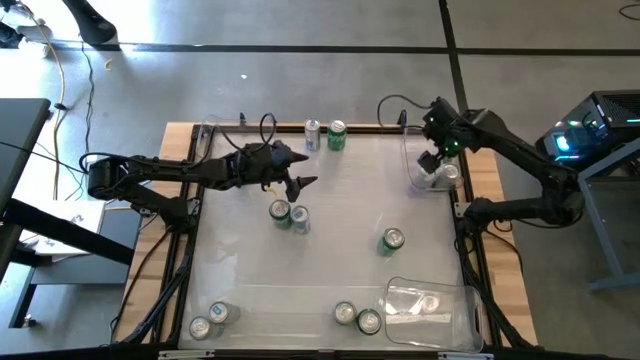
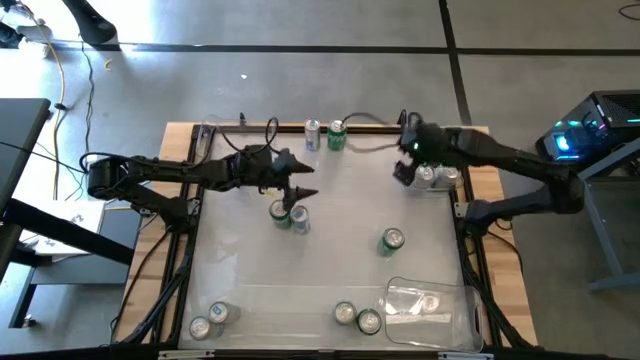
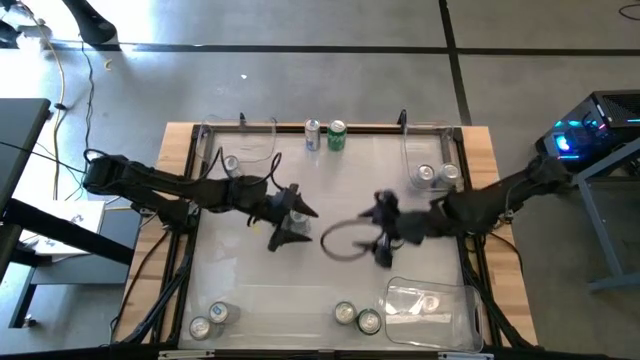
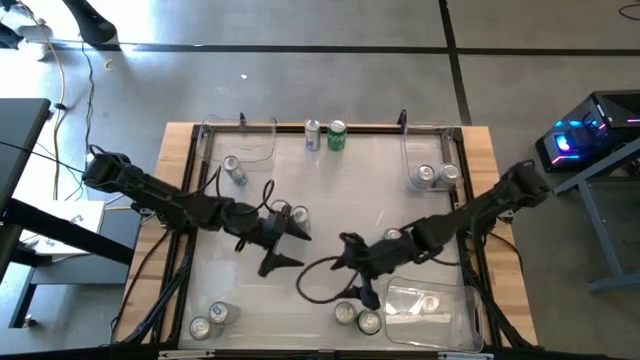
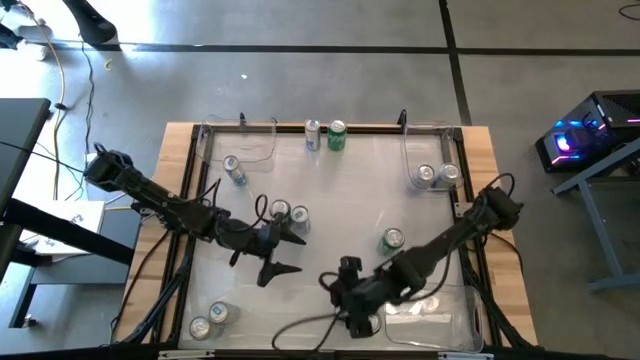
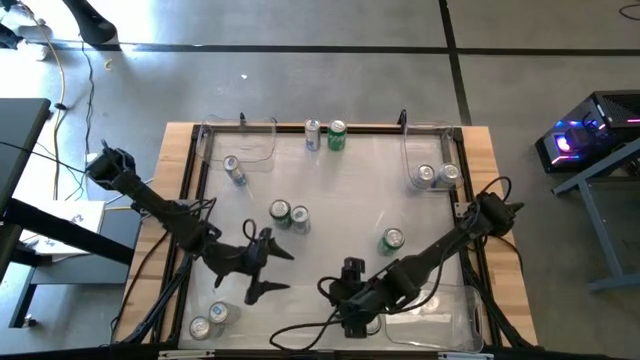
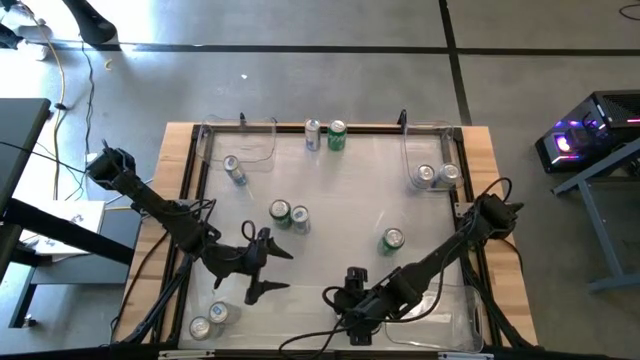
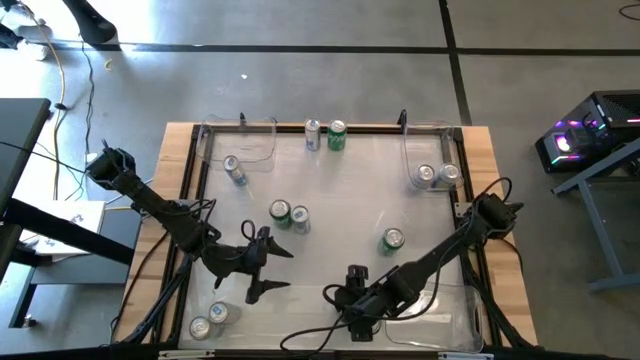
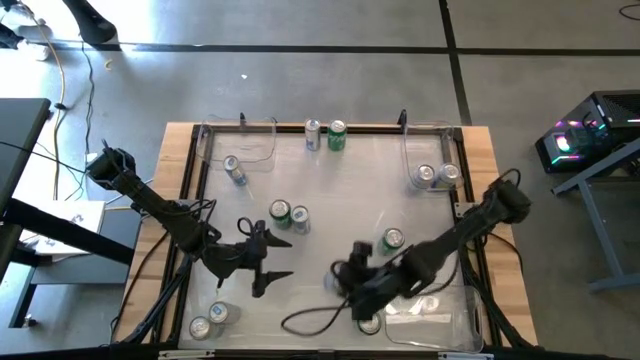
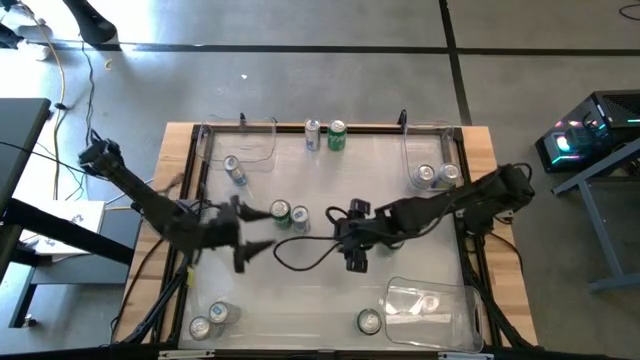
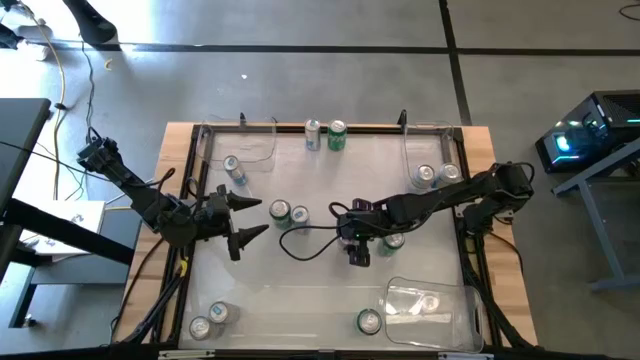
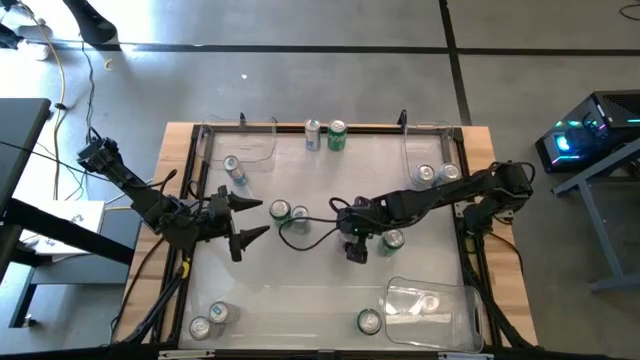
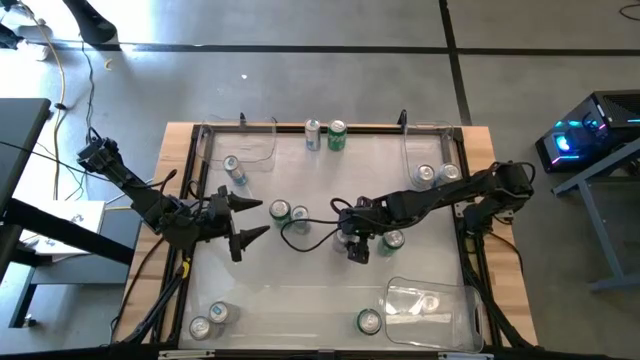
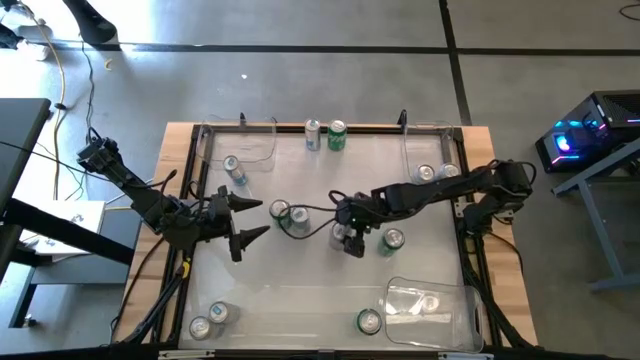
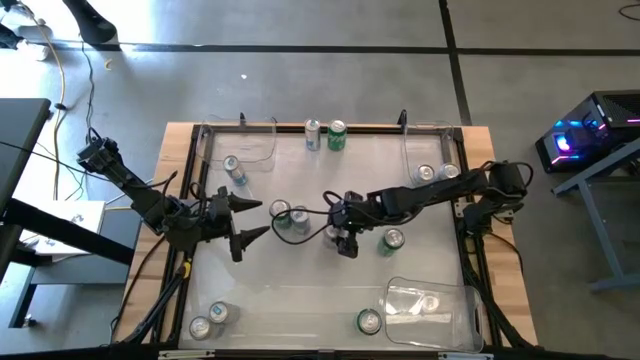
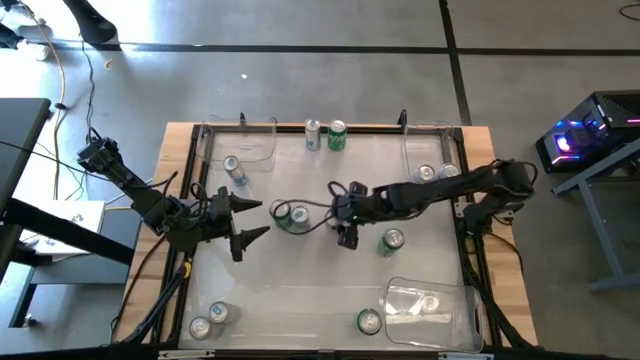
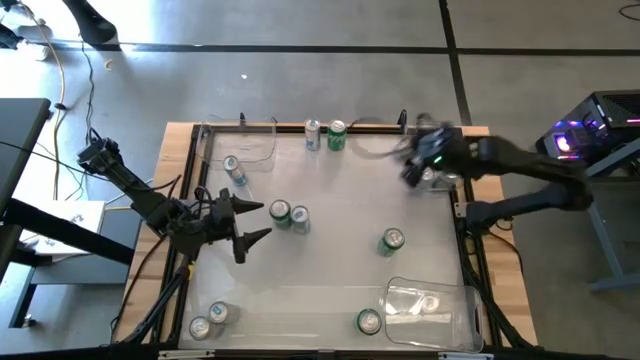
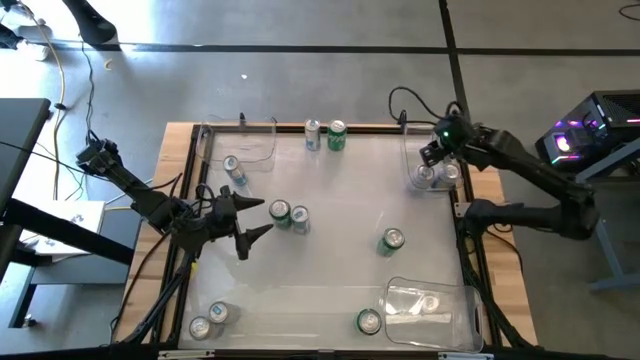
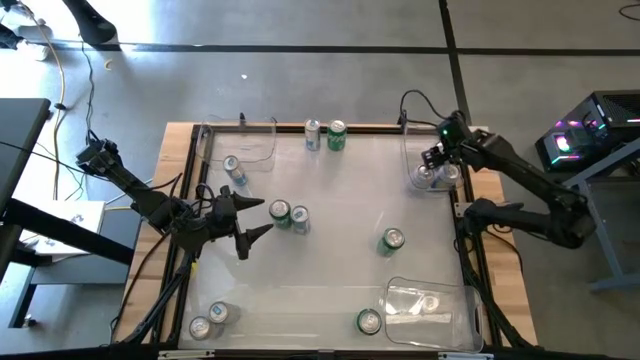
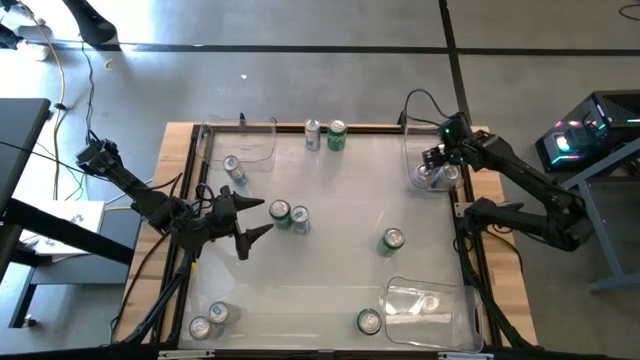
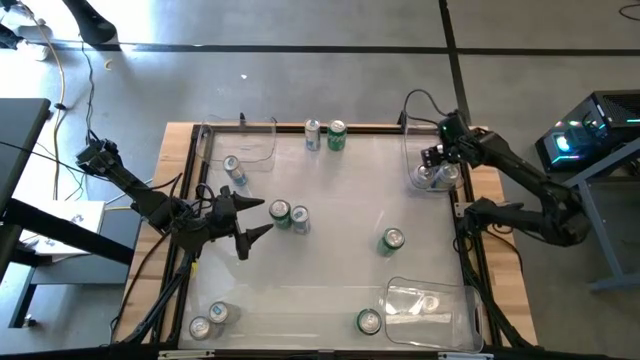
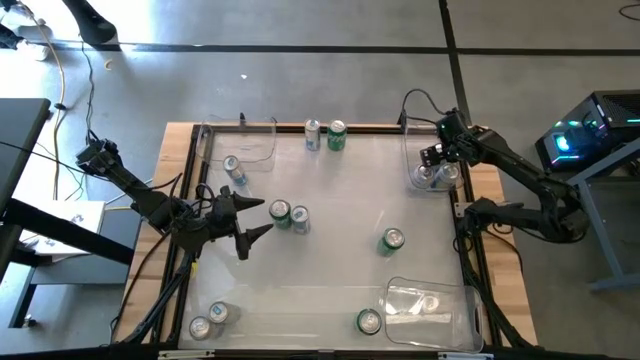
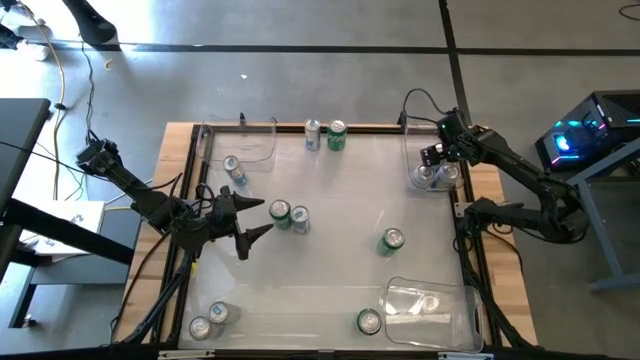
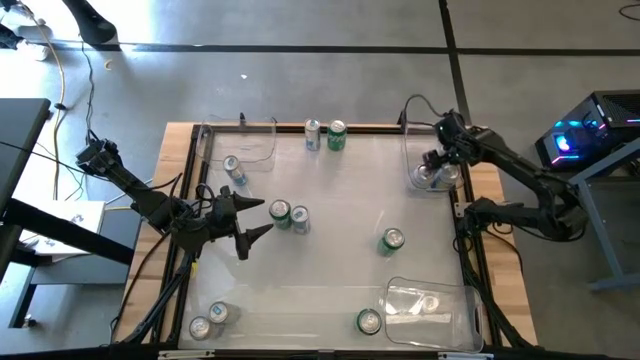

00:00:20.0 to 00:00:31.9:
Task: Sort soda cans
Put the bottom right blue white can into the top right transparent bin

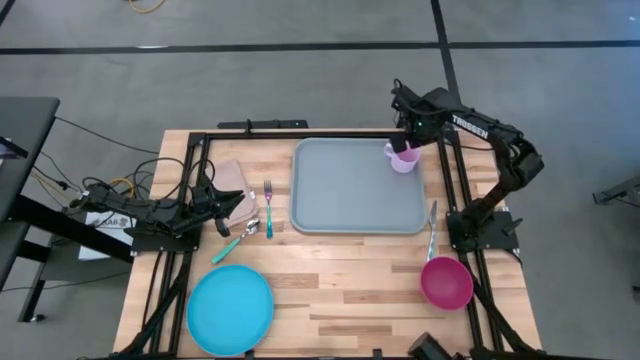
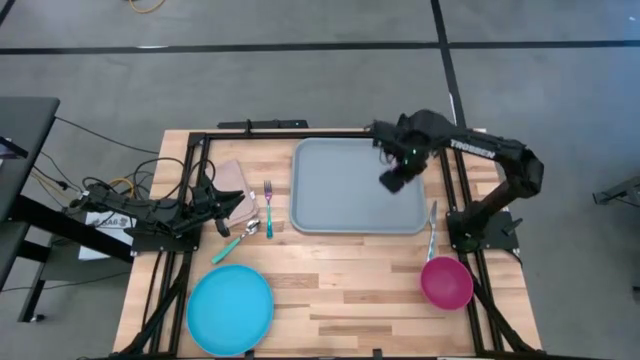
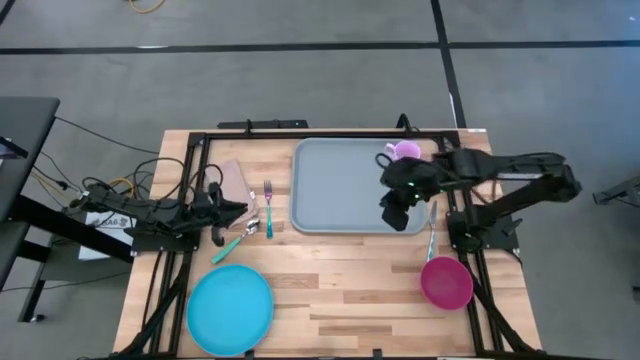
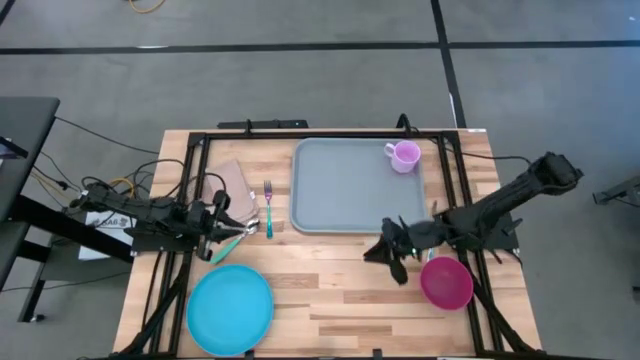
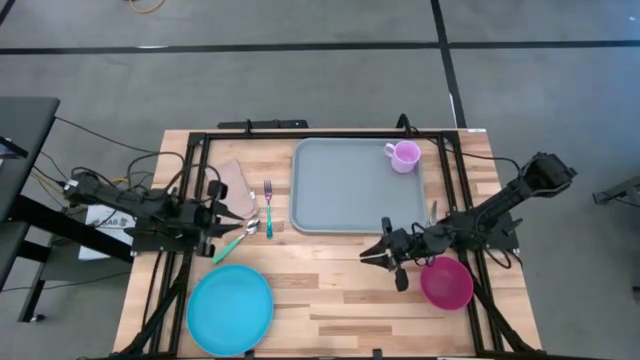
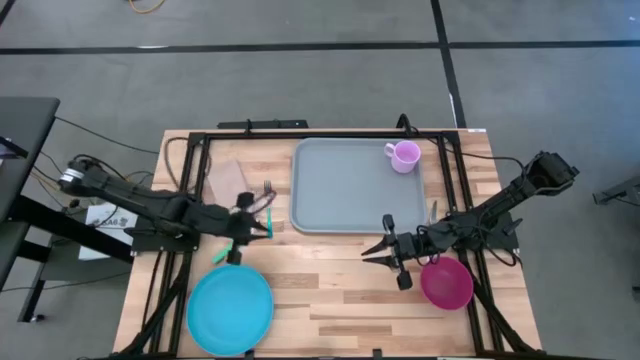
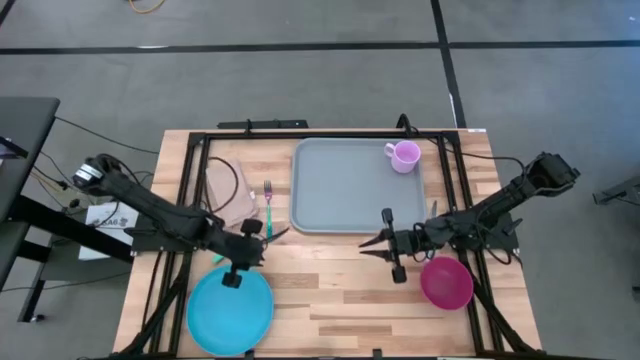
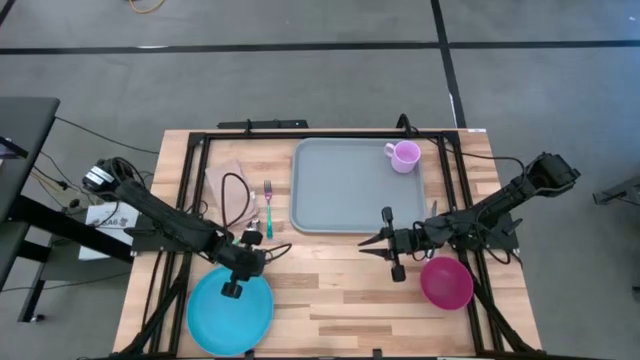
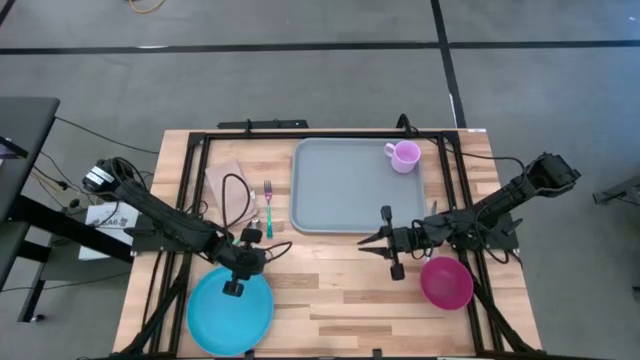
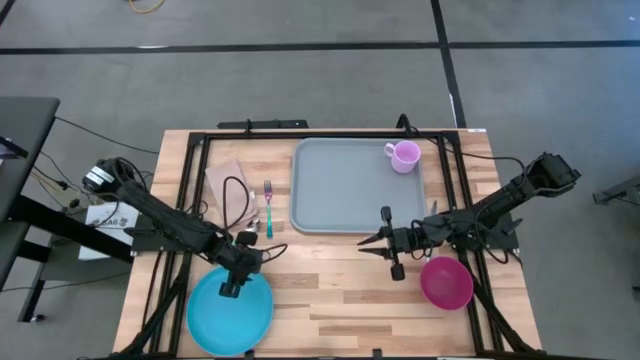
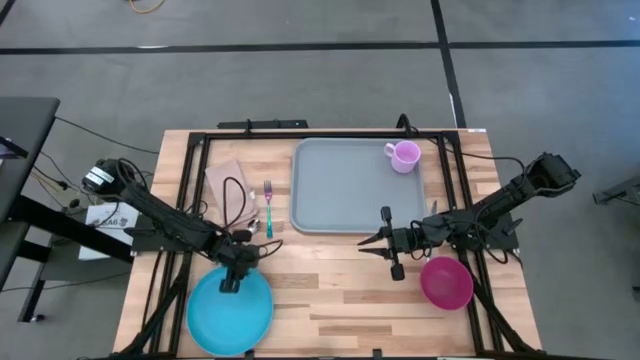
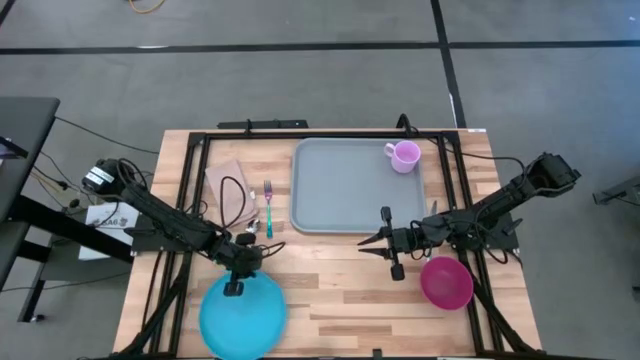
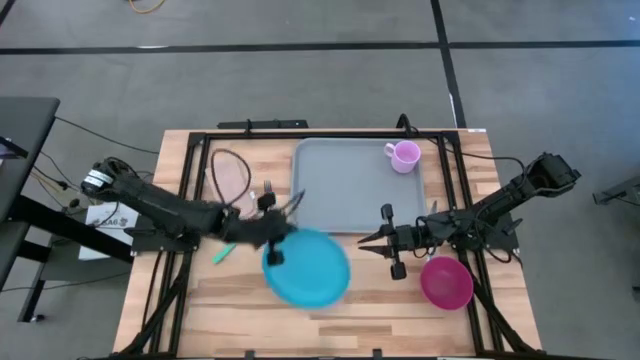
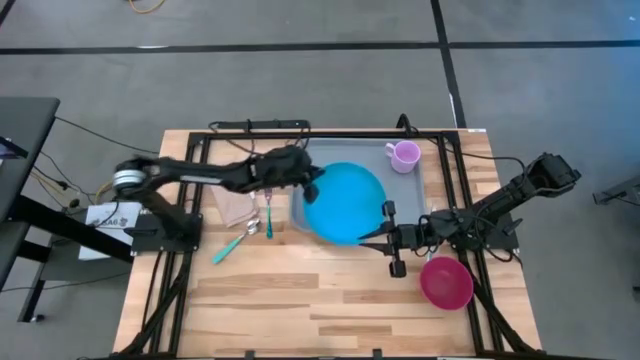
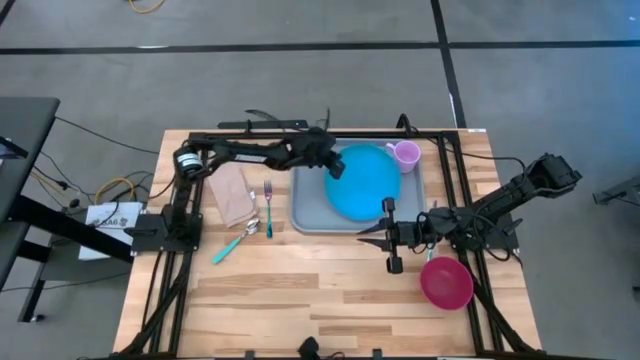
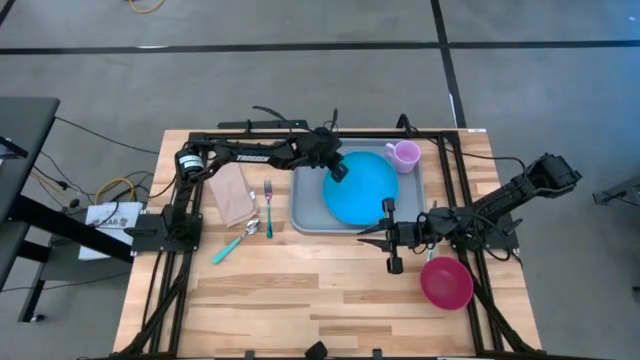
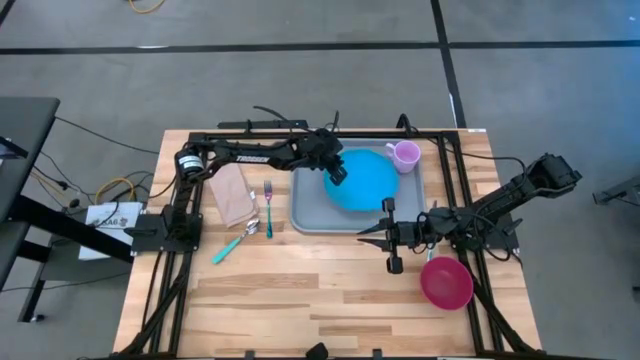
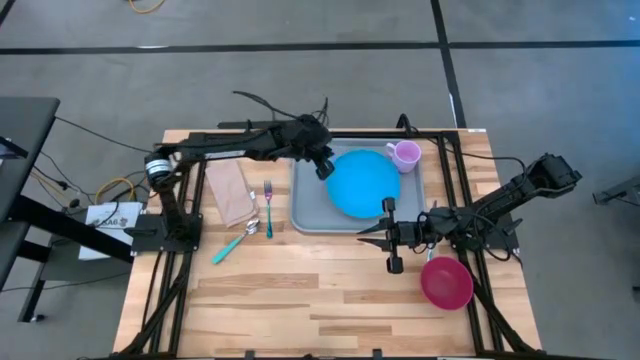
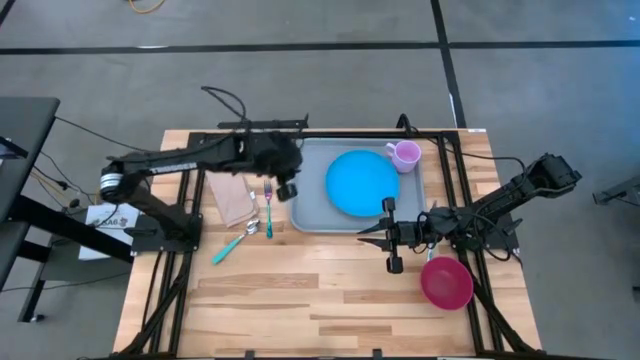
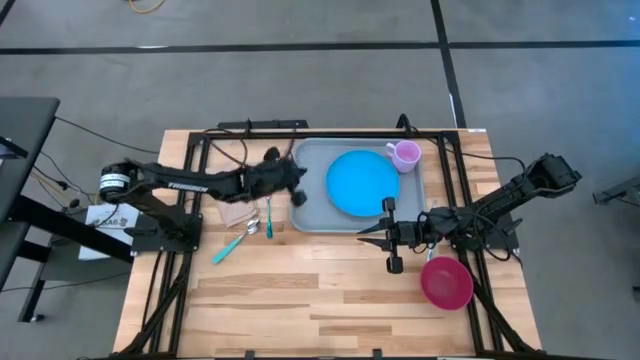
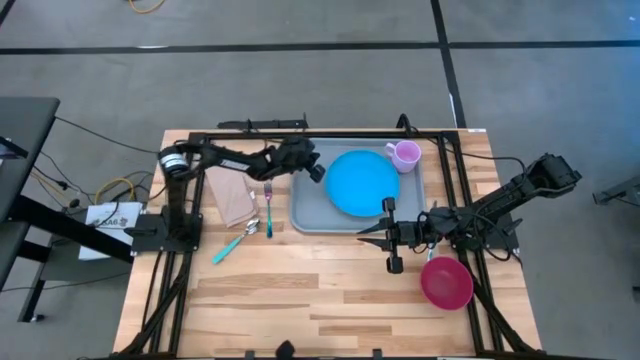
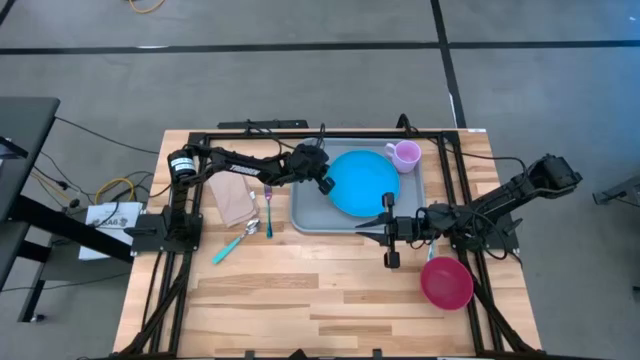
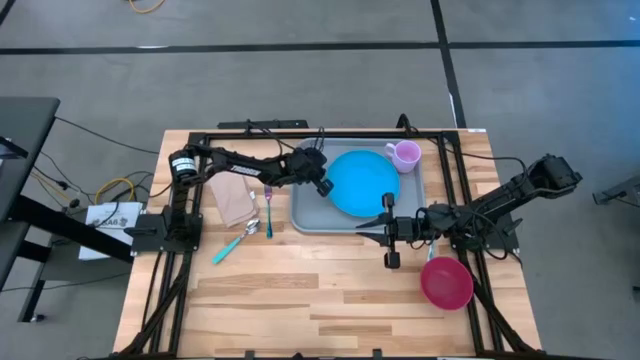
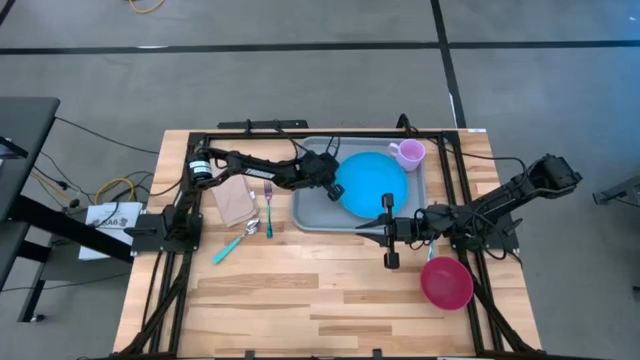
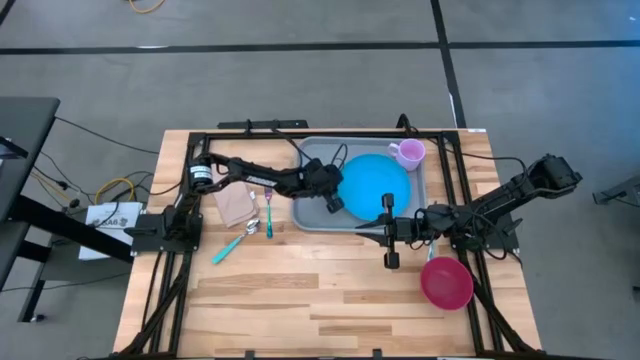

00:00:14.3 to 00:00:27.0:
Task: Set up tray
Put the blue plate on the gray serving tray to the bottom left of the pink cup
